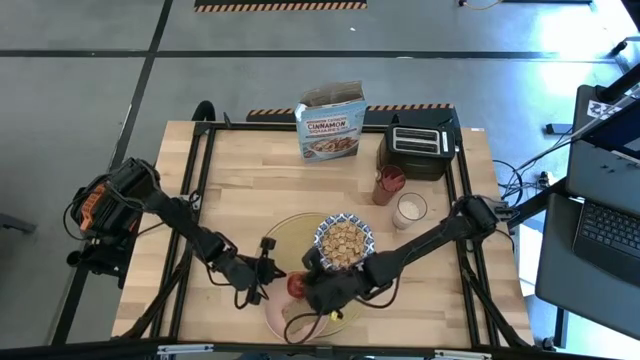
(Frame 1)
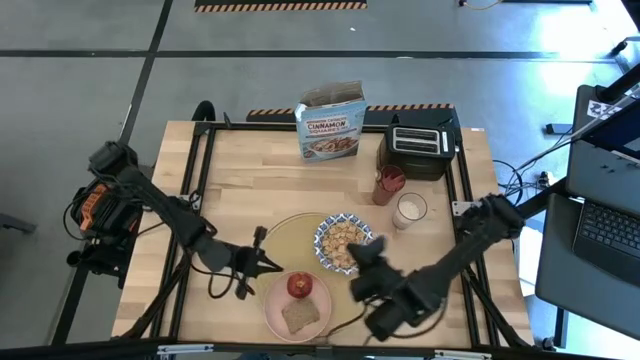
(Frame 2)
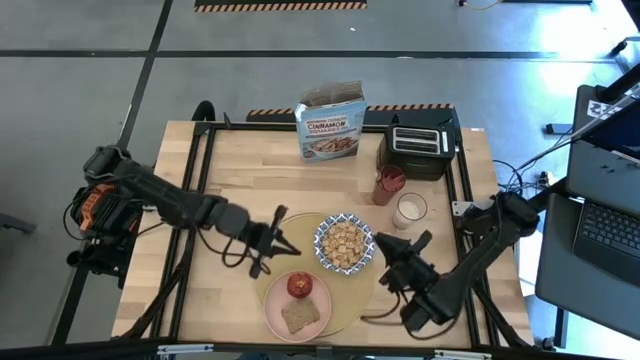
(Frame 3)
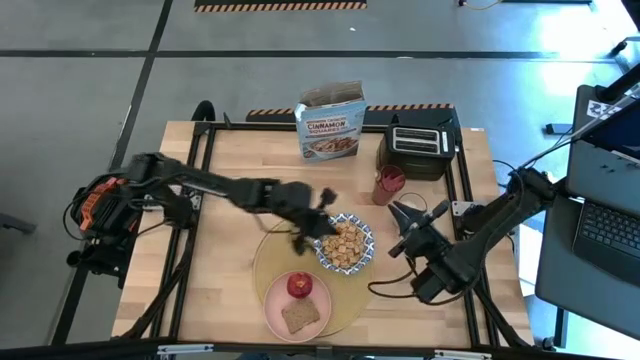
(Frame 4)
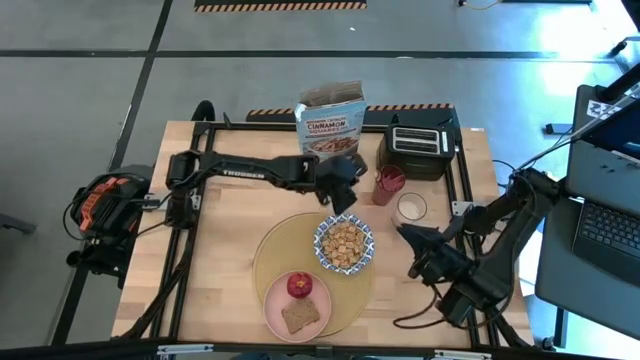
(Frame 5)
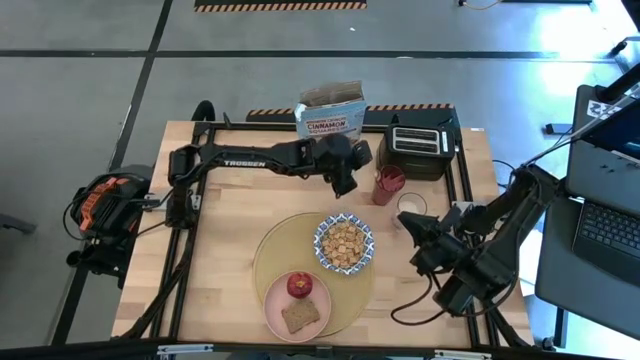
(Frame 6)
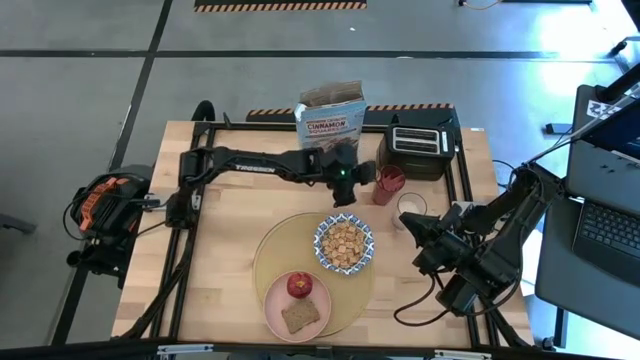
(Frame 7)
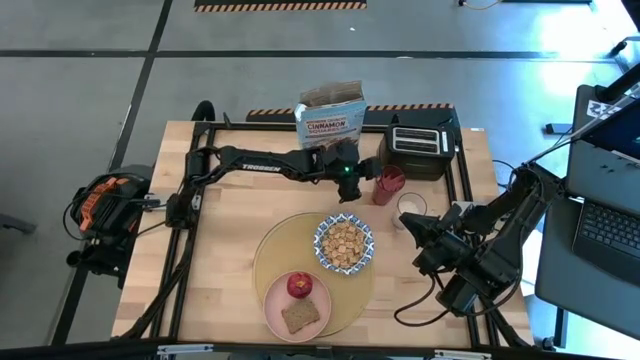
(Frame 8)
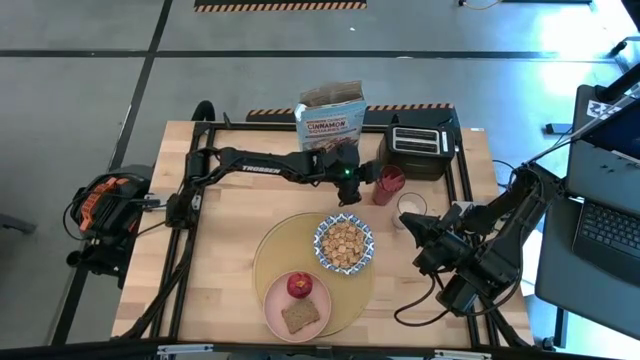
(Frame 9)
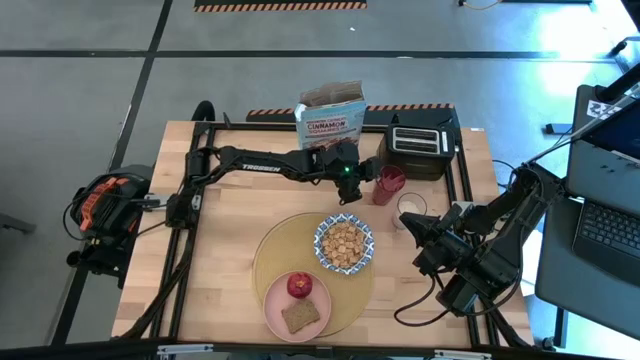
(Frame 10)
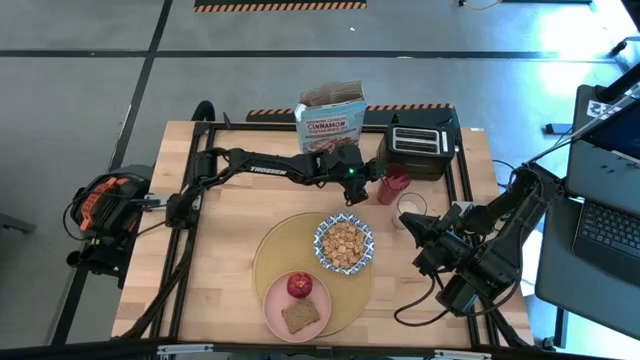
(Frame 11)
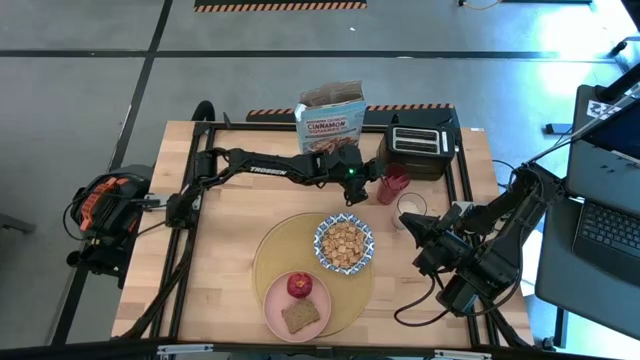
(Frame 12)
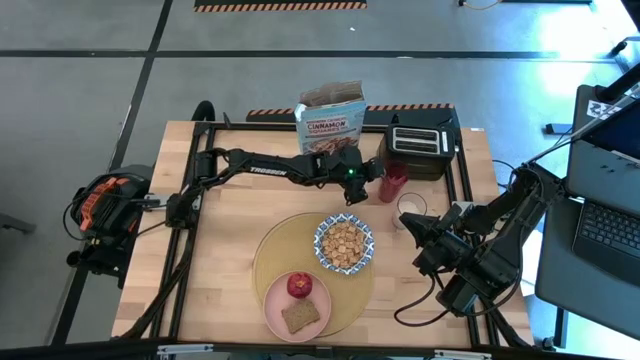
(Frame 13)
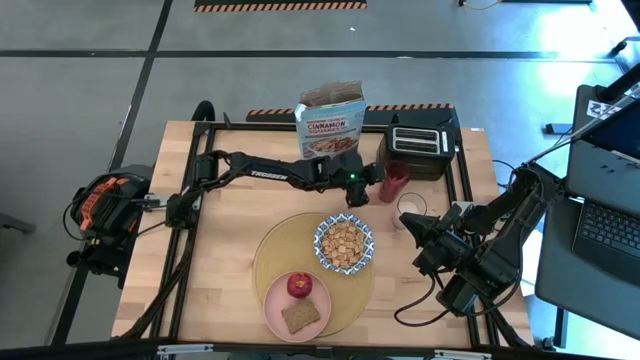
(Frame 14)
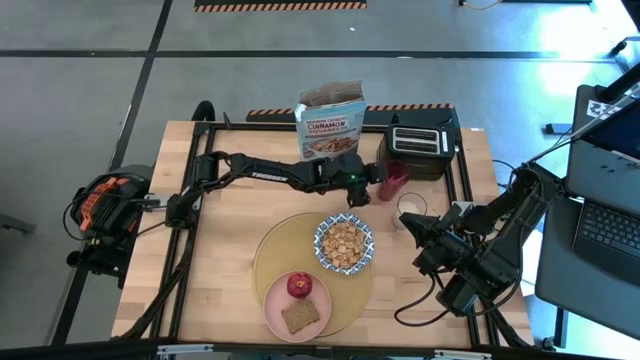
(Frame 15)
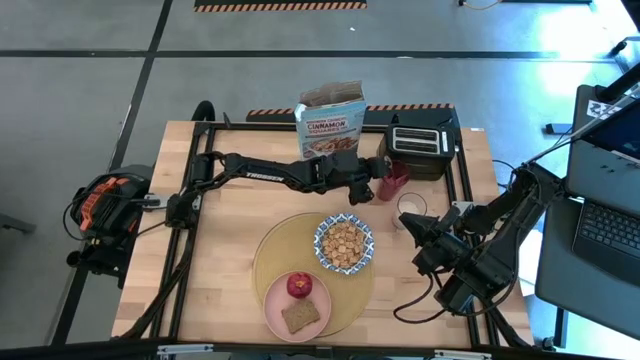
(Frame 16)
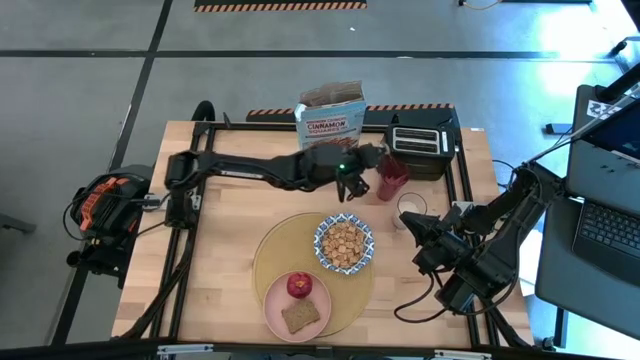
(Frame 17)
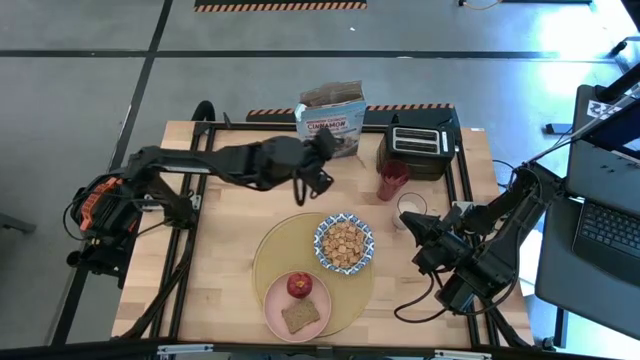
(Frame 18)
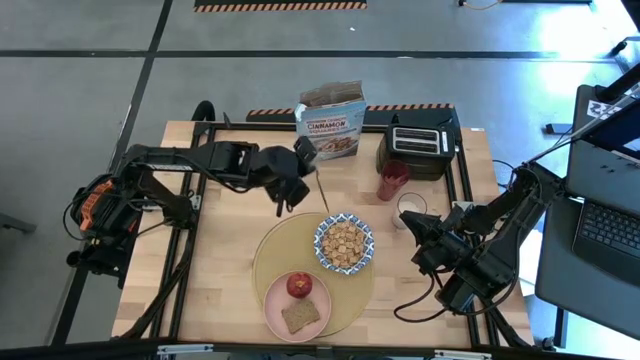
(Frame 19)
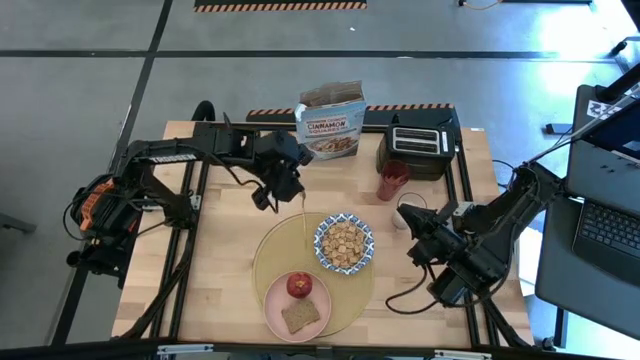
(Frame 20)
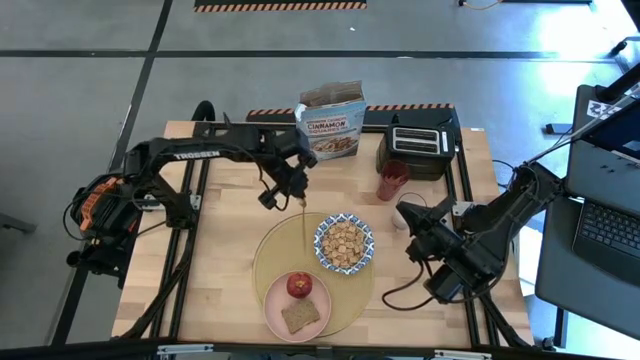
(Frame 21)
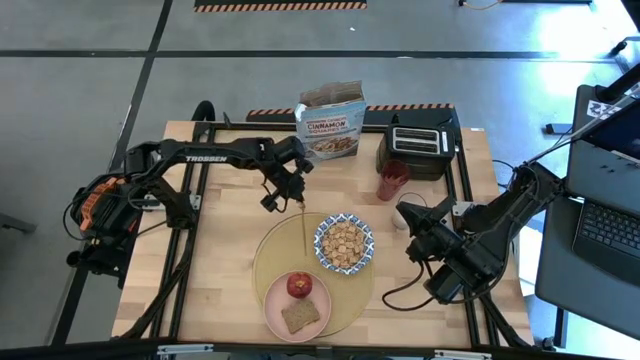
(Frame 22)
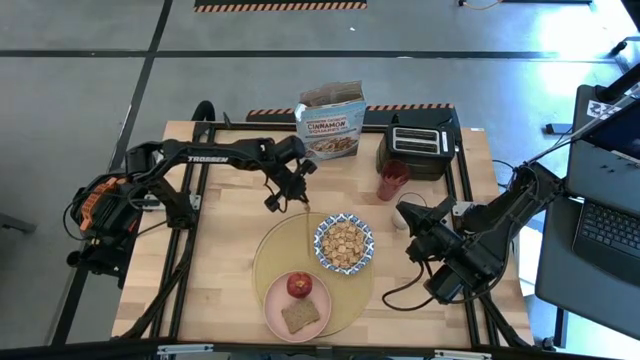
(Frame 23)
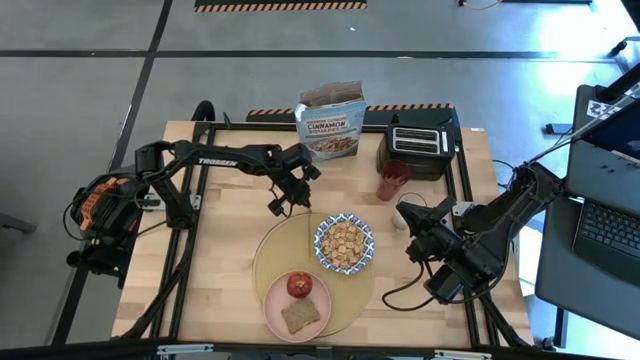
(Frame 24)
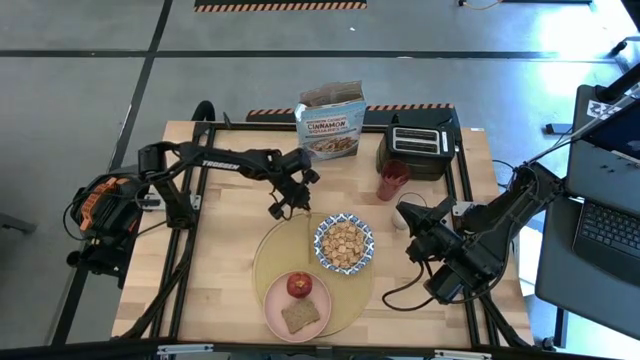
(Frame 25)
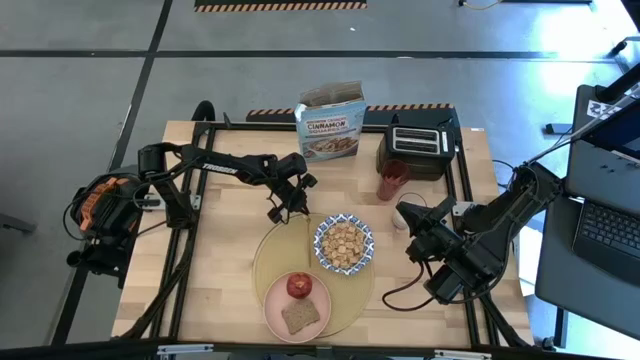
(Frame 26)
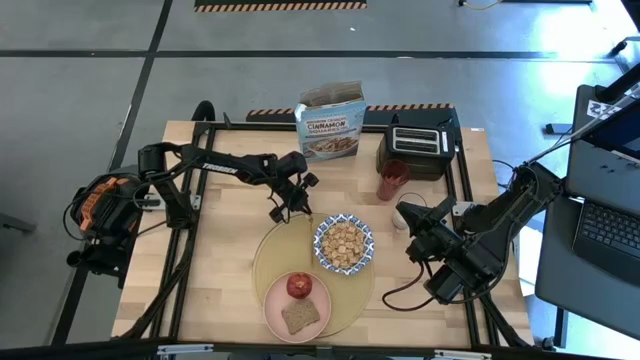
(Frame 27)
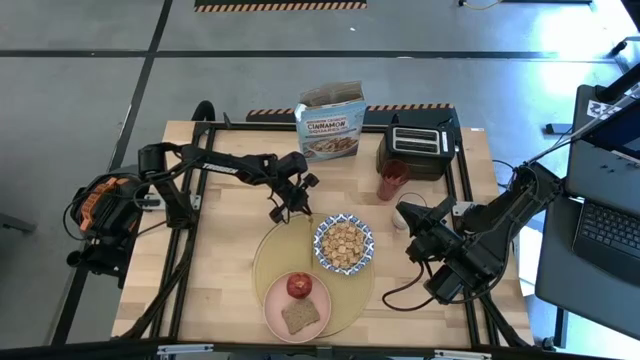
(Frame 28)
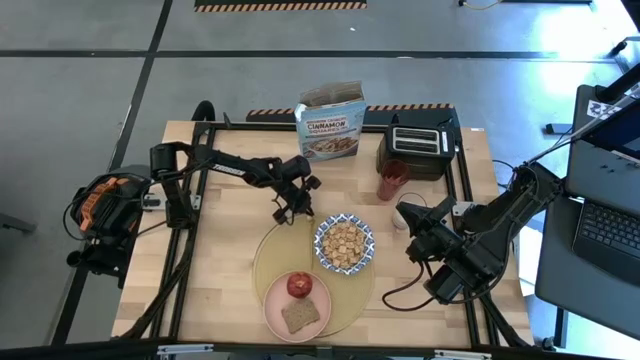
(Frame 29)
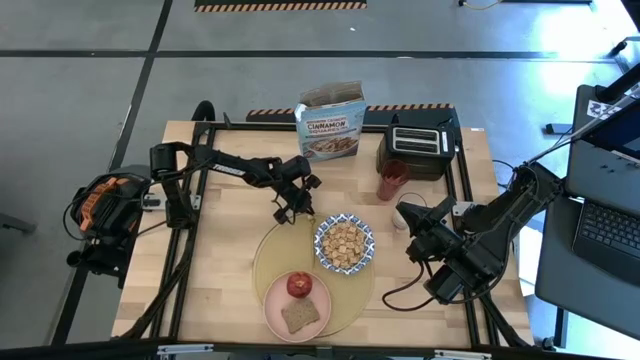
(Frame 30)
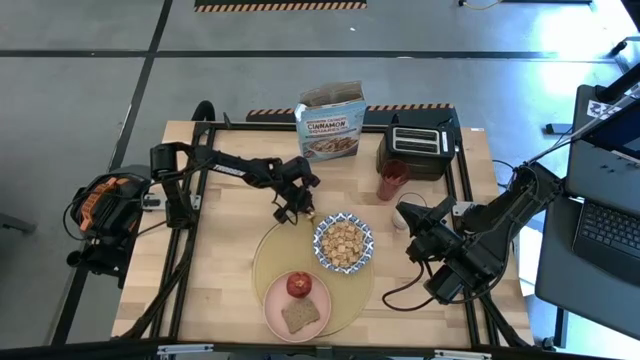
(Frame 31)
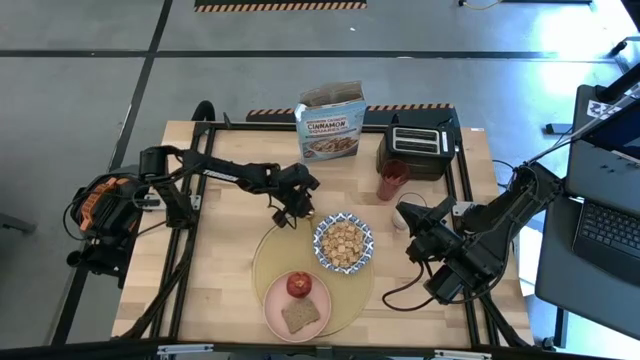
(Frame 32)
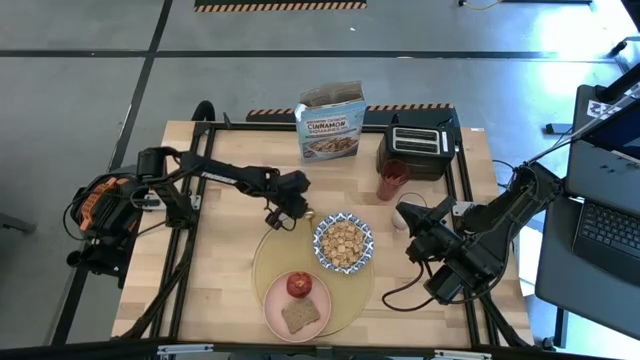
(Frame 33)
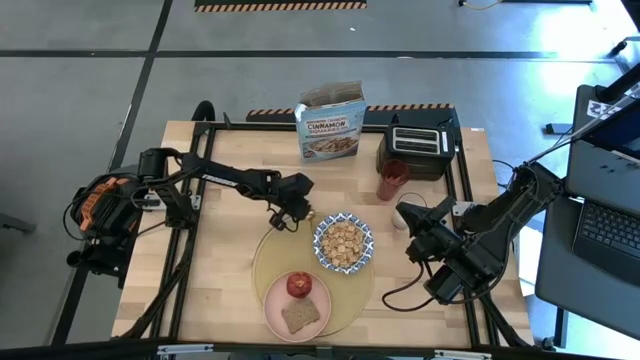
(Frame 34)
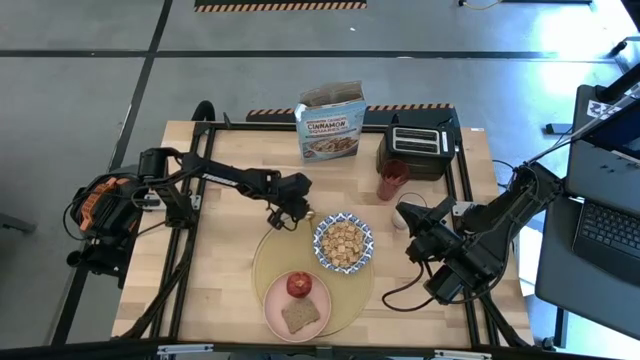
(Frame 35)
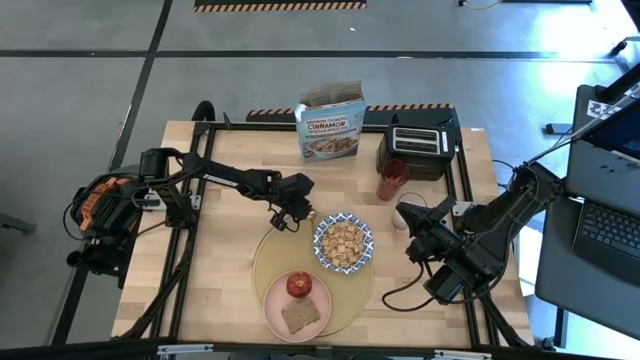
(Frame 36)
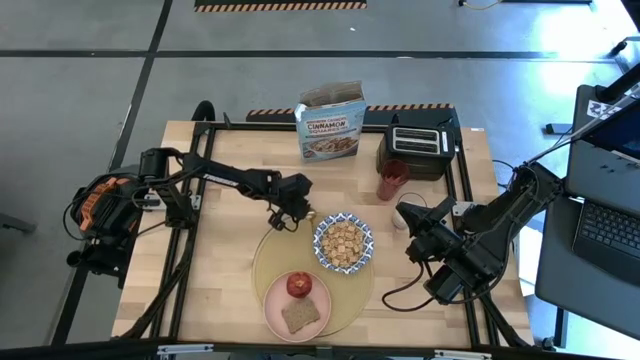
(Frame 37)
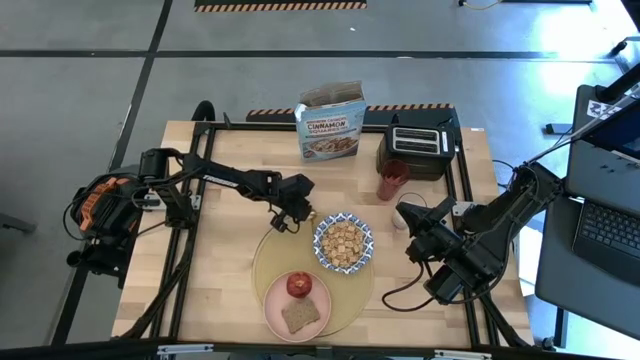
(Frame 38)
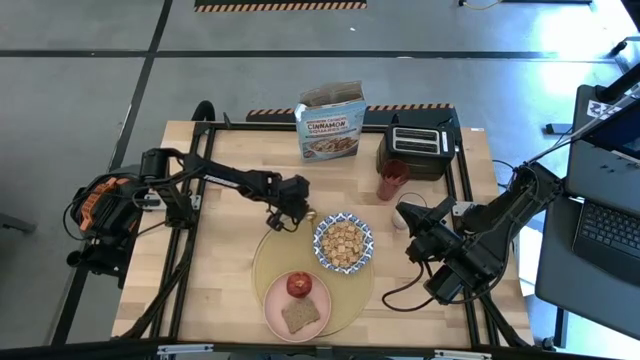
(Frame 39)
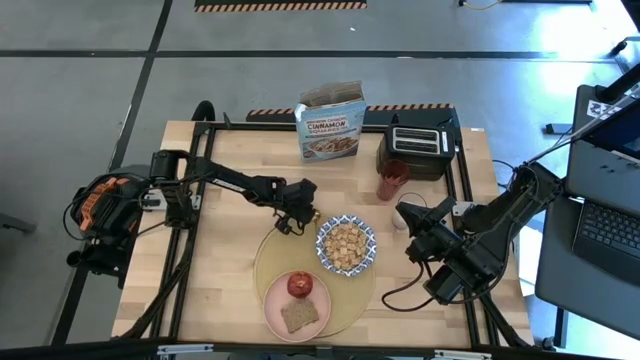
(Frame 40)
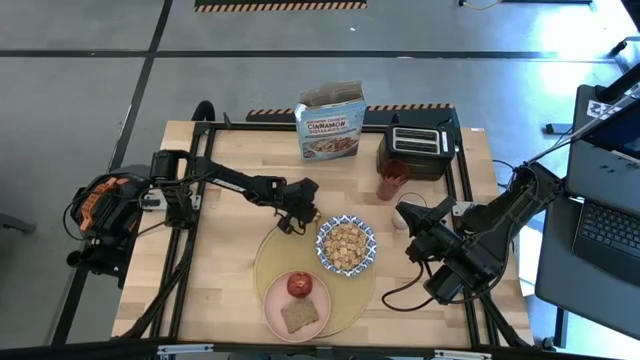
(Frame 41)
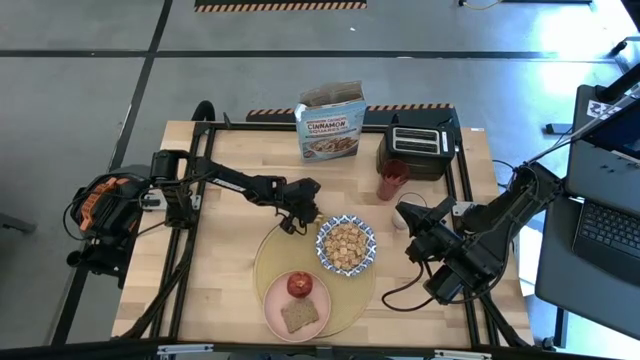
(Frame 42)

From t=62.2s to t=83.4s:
Task: Arrange a breakfast setting
Put the gold spoon on the table mat to the left of the white bowl

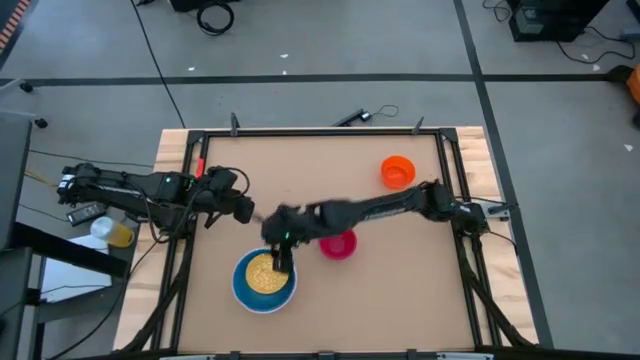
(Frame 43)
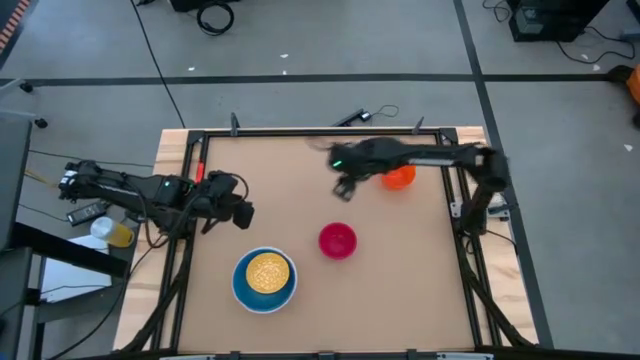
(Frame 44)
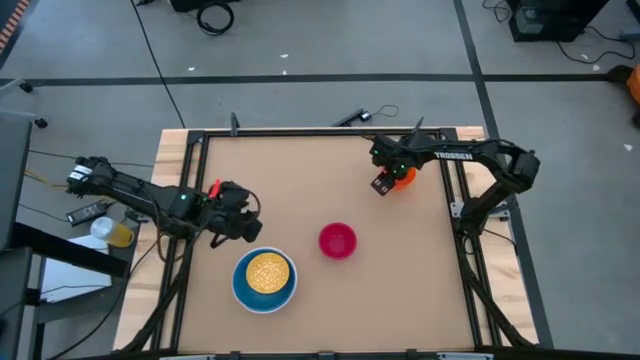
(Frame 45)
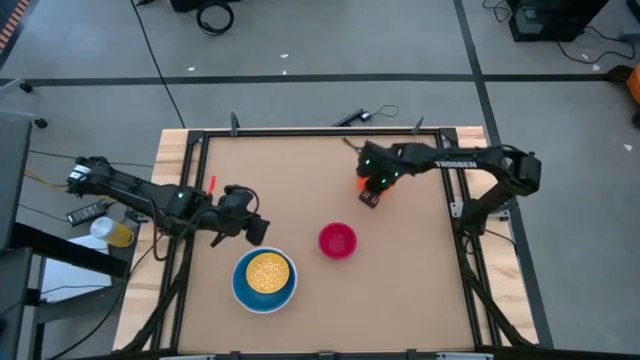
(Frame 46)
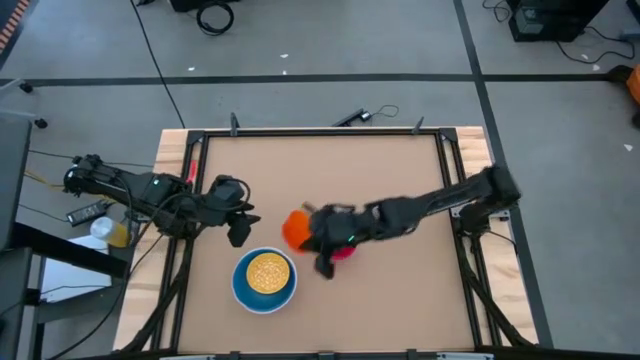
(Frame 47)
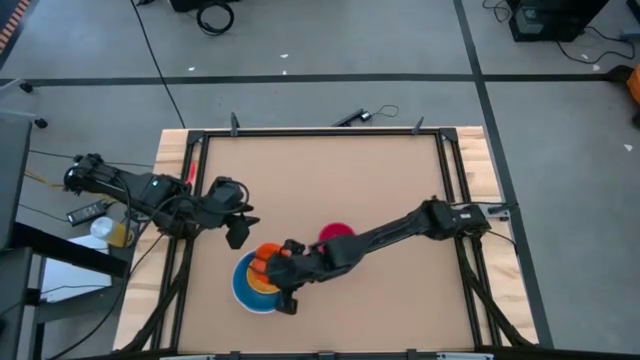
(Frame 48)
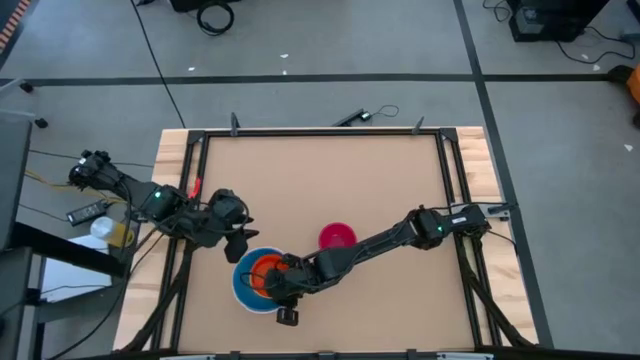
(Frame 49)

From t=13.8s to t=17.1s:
Task: Nest bowls inside each other by size order
Stack the orange bowl on top of the yellow bowl
